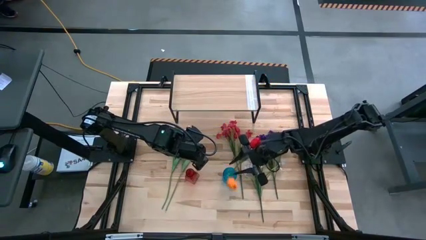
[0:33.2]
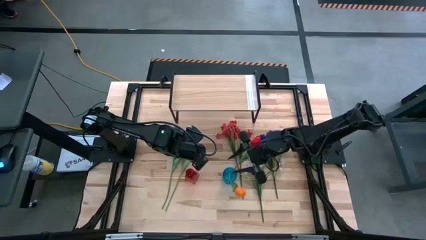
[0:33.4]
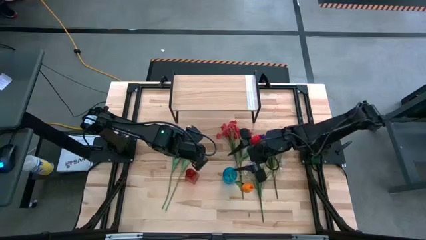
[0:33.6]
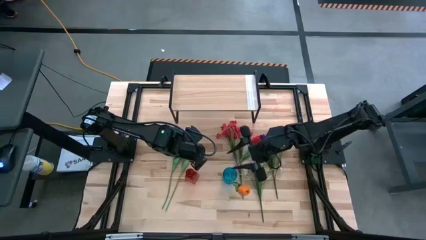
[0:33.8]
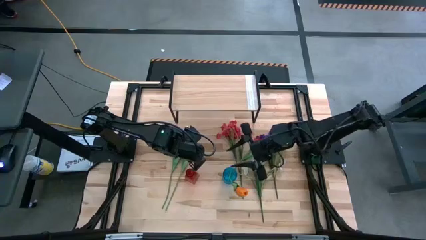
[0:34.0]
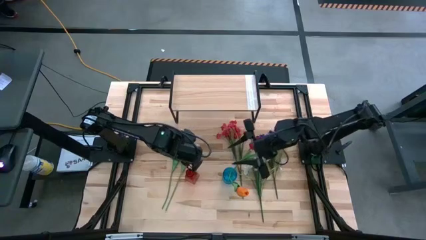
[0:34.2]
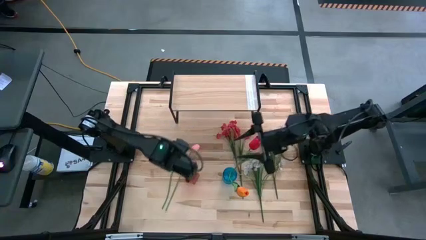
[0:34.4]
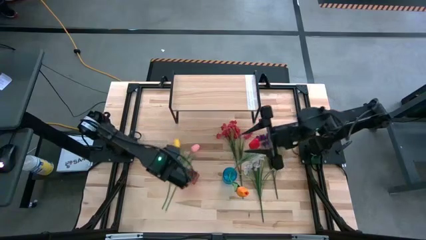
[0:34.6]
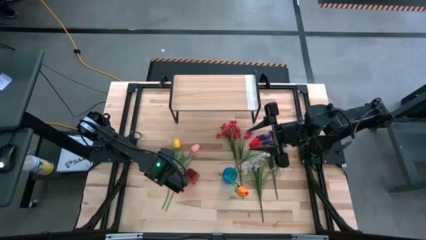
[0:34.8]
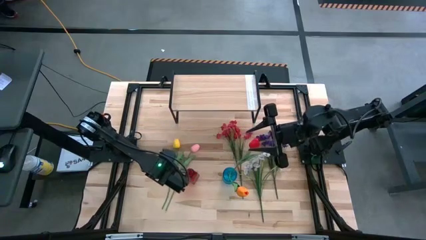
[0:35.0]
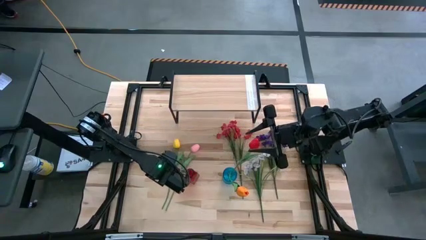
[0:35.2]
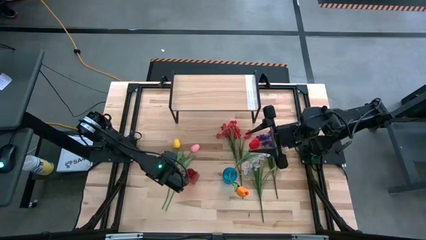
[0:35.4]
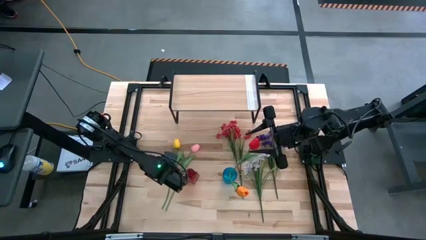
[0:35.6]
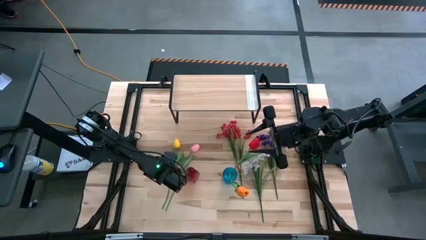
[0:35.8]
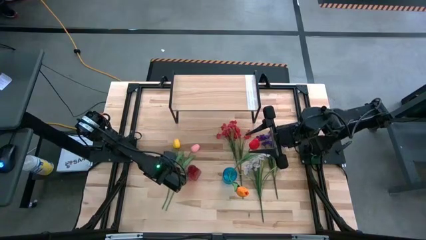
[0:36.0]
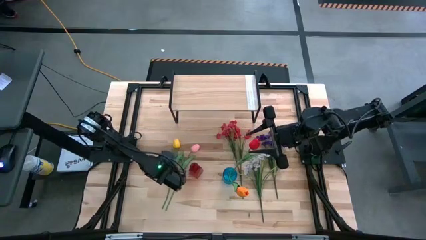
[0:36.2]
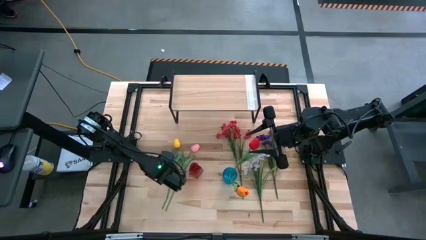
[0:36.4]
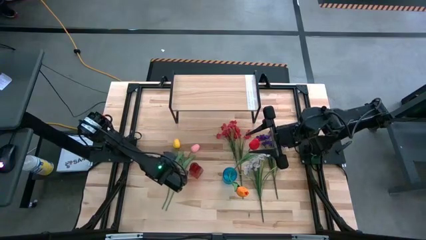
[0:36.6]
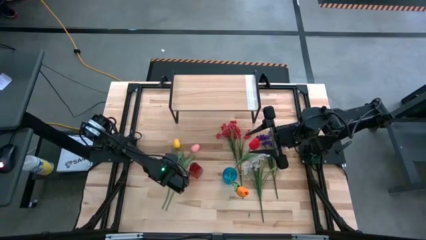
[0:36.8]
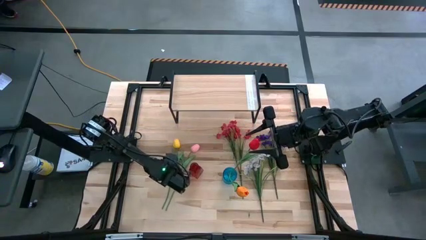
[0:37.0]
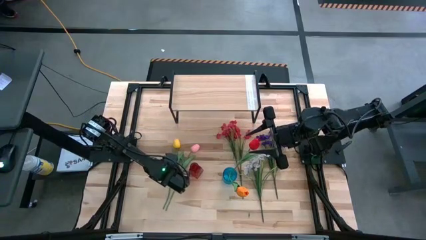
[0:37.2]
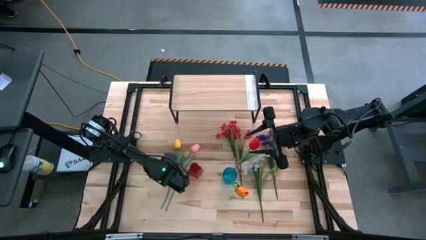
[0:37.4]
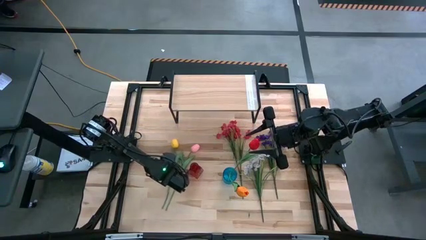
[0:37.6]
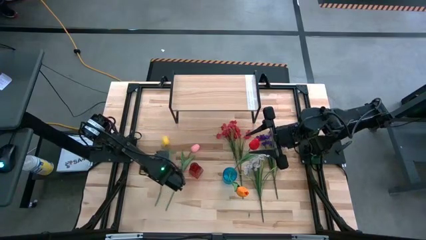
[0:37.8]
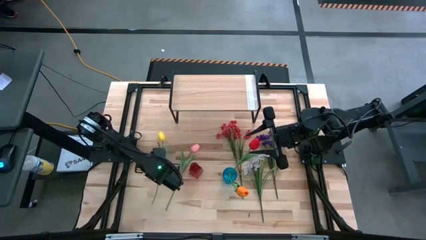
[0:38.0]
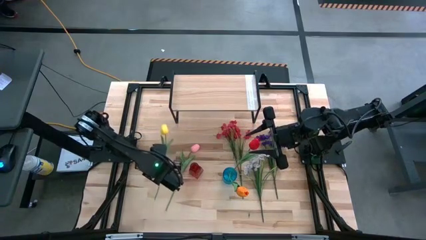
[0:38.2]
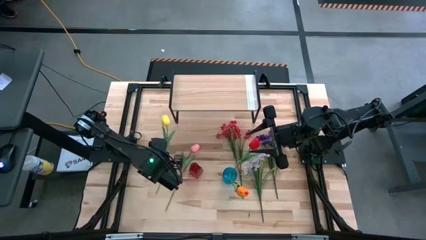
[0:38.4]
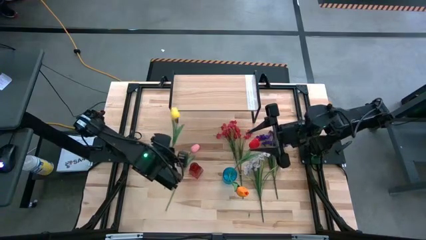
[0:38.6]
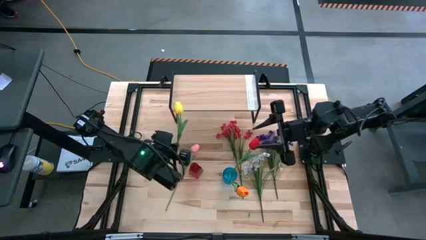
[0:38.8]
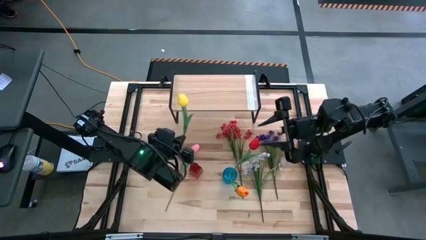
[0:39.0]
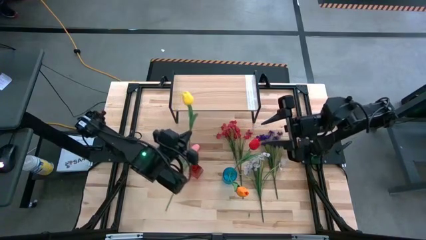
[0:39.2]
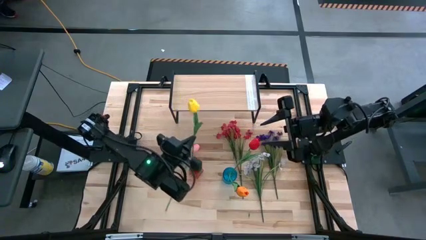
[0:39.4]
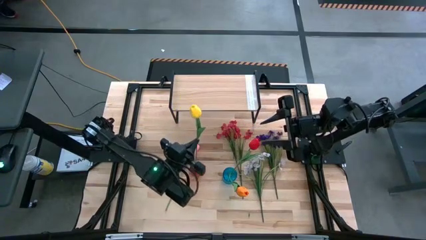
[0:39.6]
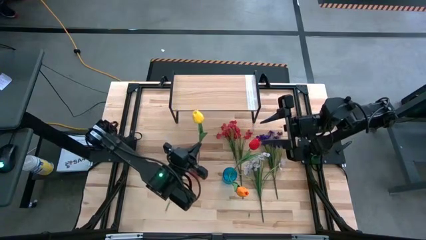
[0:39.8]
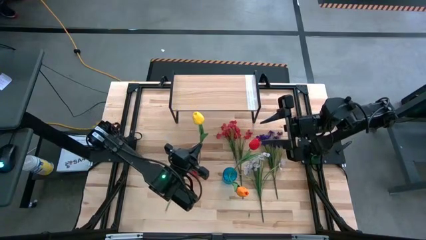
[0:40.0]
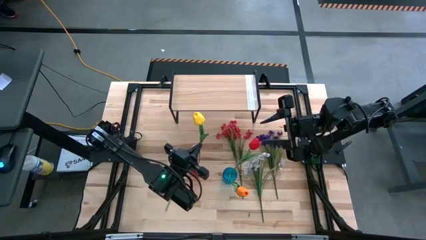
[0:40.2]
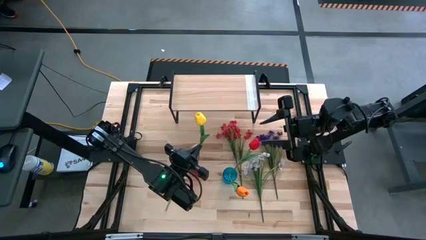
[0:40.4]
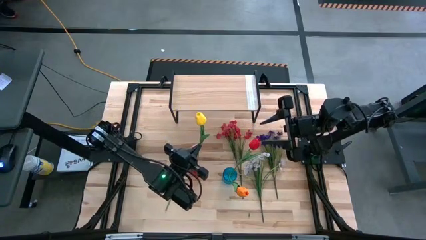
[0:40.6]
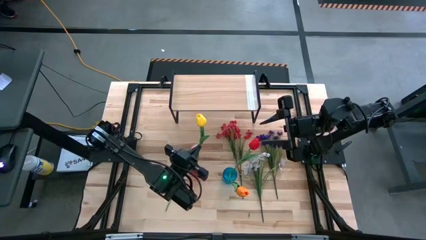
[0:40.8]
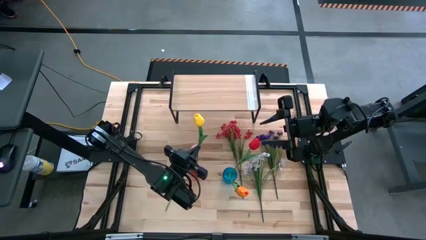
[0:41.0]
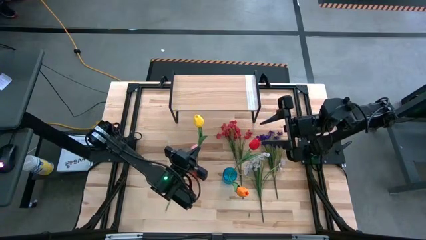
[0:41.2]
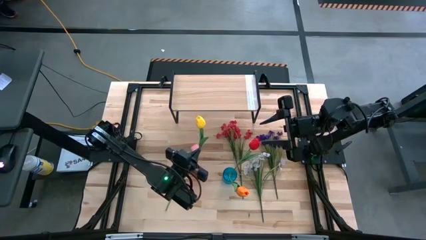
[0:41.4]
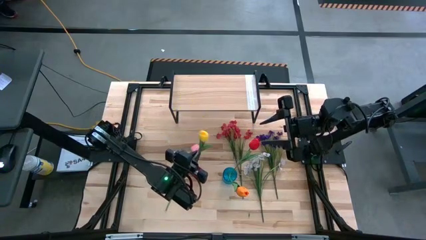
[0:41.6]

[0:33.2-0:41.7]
Task: Pick and place flowers into a vace then onto a shelf
Put the yellow flower into the red vase

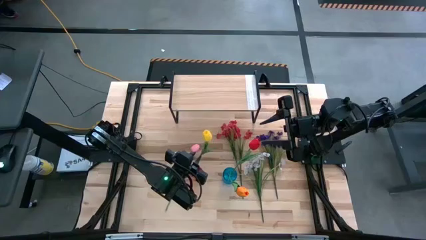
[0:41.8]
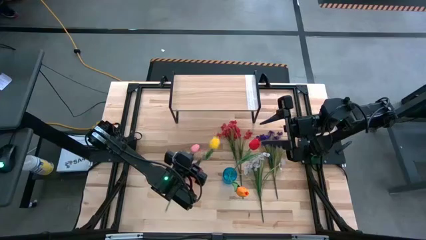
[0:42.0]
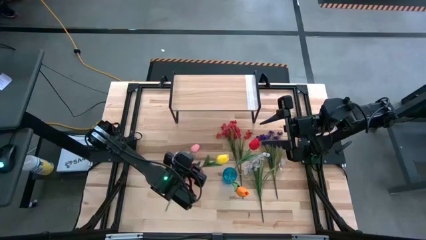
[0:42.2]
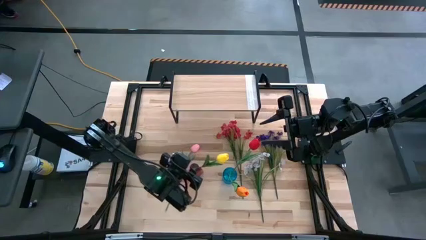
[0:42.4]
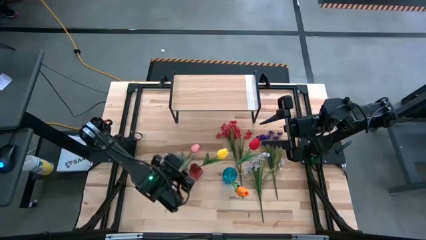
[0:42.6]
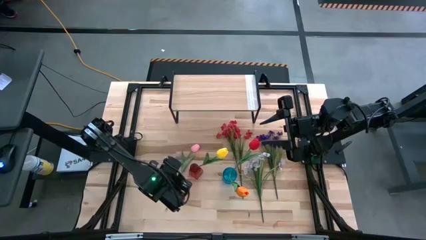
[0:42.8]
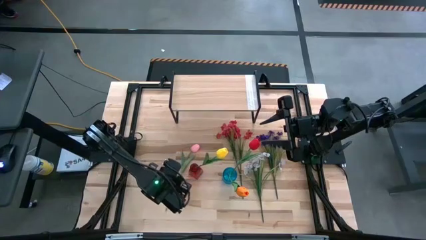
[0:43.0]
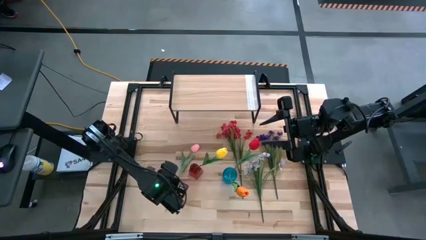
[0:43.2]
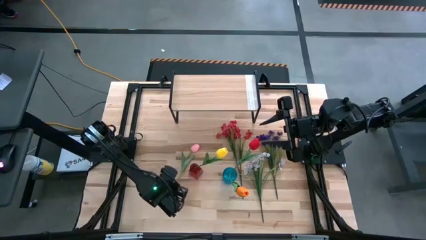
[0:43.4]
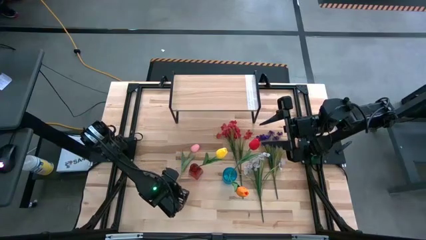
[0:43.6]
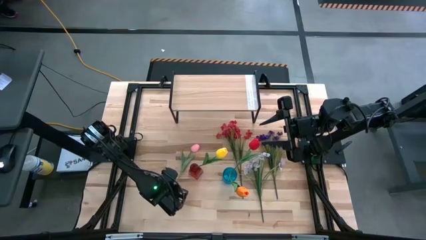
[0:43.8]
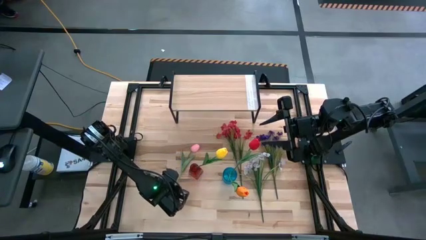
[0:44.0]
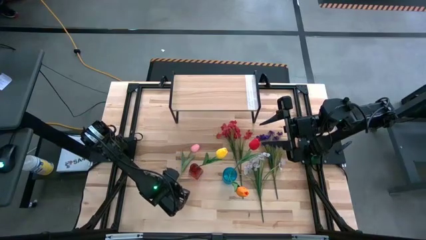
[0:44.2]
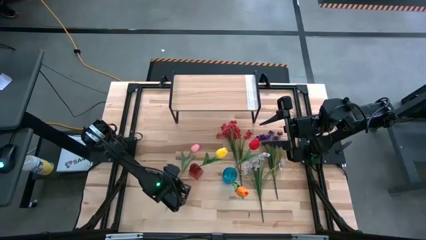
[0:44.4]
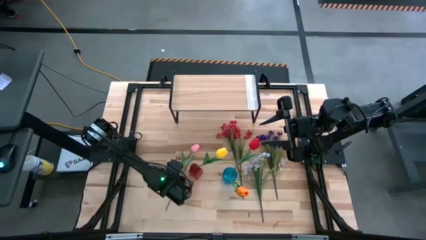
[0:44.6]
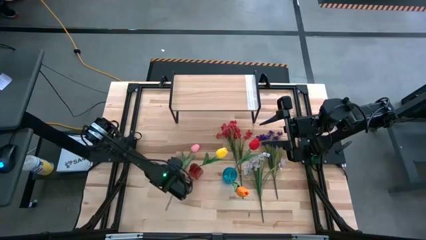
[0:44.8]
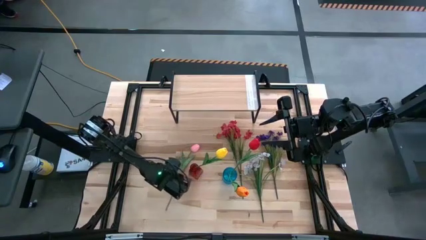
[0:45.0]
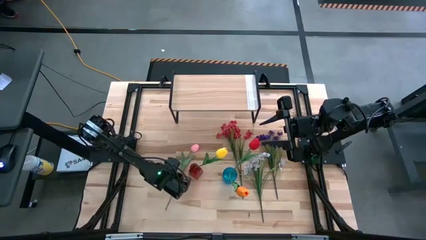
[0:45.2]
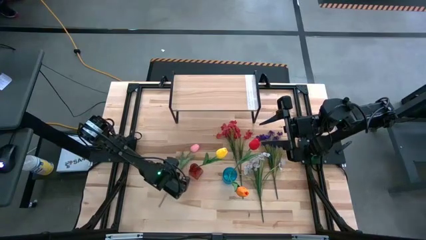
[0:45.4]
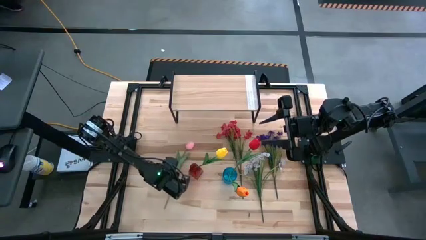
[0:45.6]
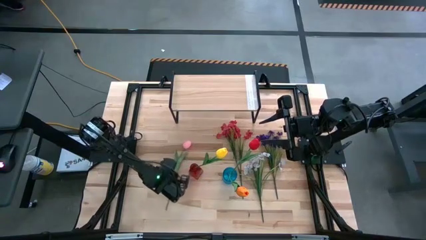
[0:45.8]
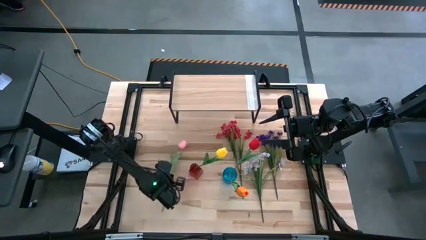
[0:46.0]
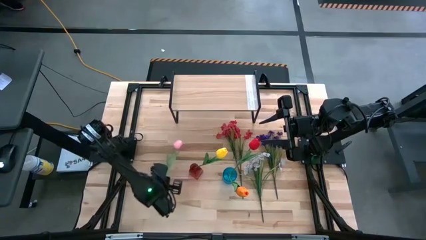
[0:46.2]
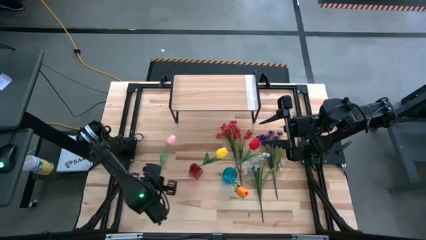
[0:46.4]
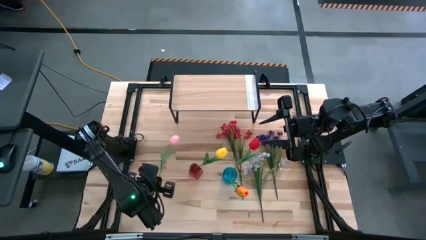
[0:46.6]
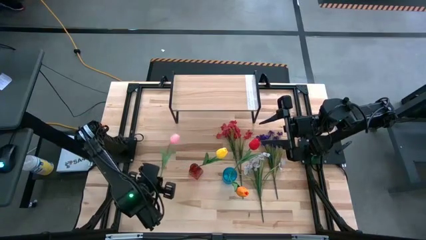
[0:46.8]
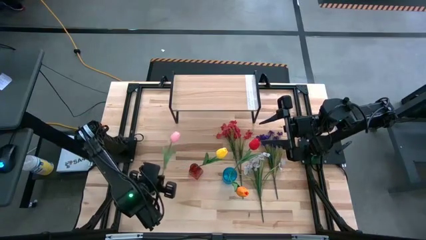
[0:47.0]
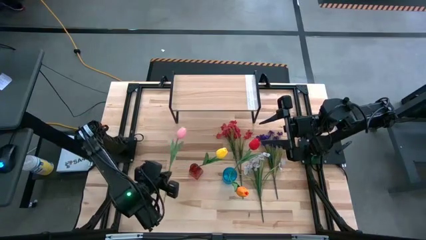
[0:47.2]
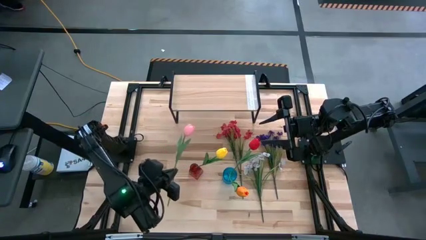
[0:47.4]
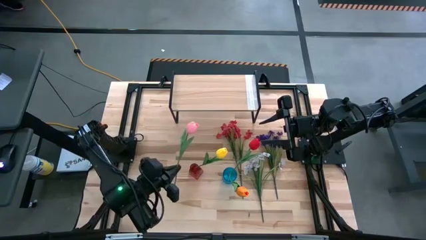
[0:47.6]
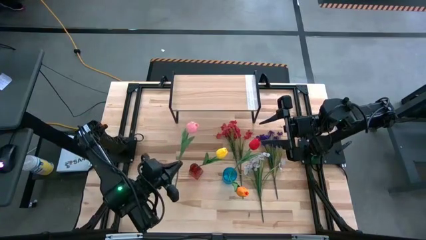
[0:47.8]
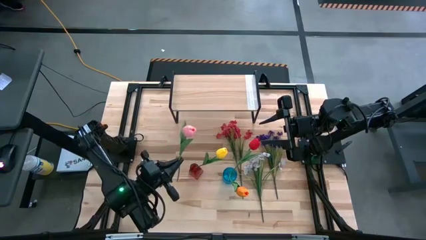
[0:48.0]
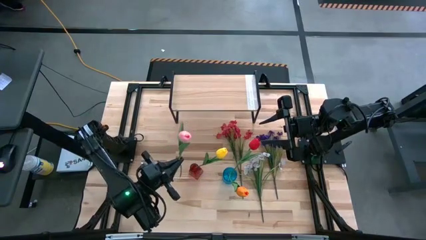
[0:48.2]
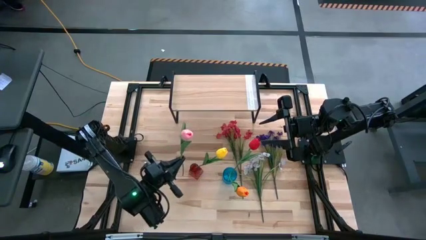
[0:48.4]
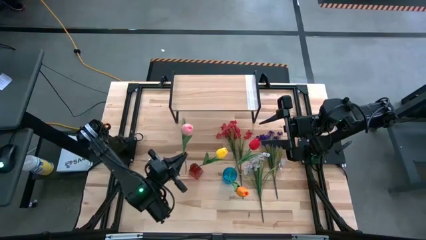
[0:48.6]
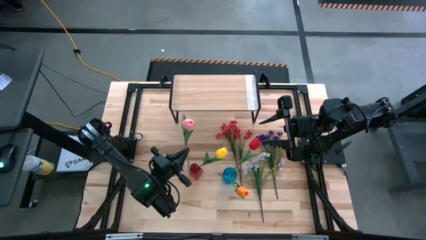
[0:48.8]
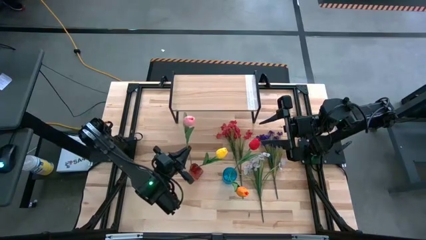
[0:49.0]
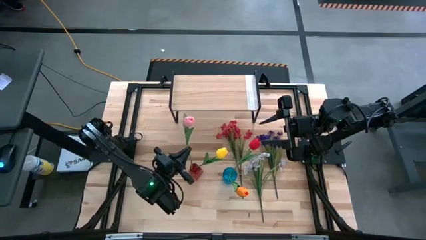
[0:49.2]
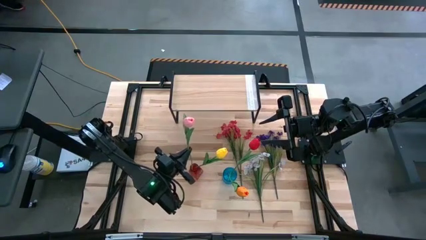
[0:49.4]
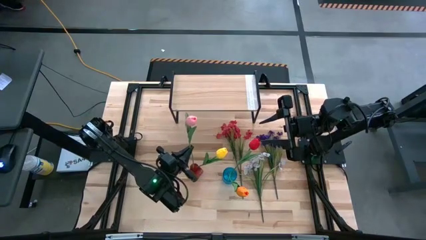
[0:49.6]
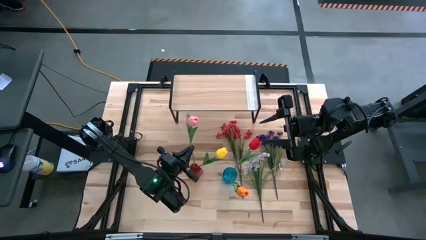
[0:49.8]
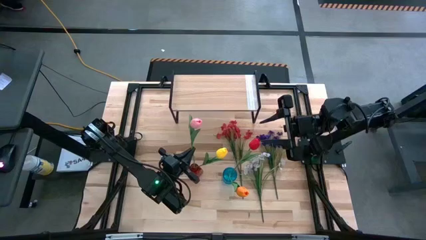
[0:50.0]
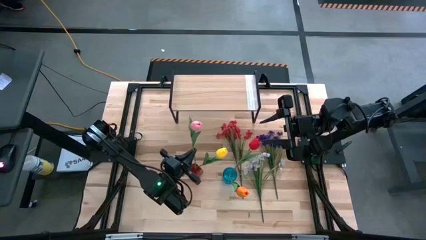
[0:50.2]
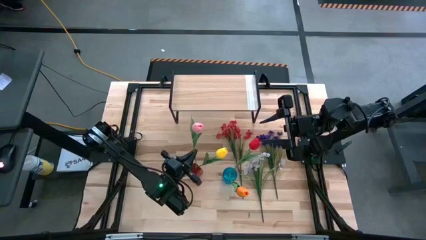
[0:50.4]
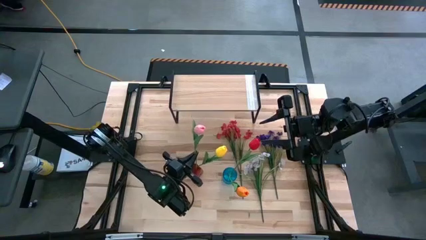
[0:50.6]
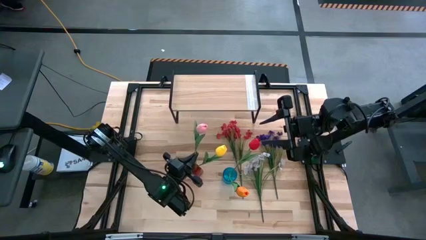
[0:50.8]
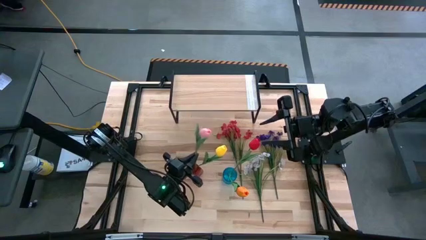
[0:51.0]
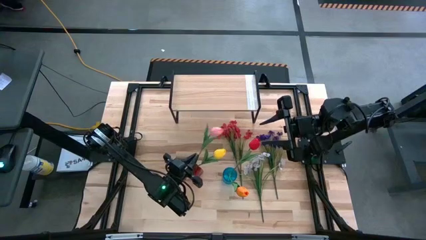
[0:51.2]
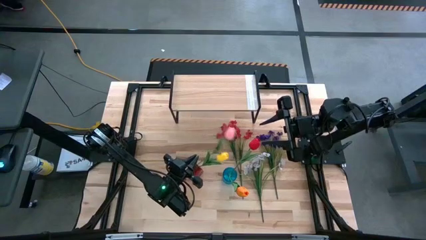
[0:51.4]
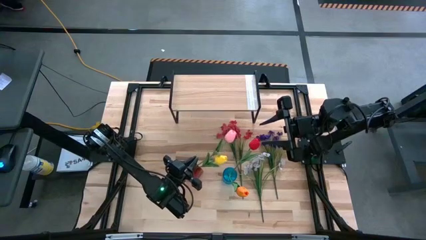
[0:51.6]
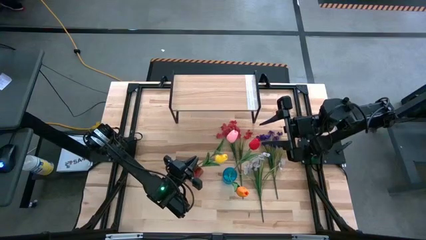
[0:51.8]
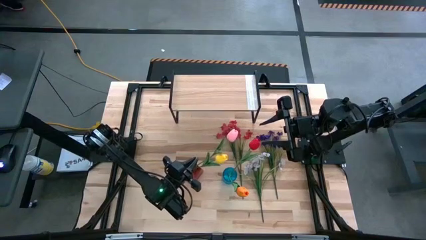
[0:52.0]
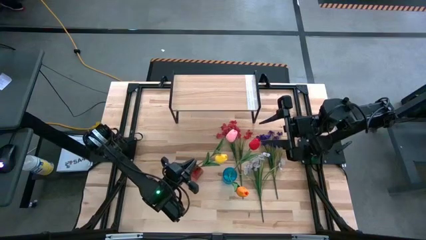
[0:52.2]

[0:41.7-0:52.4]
Put the pink flower into the red vase
